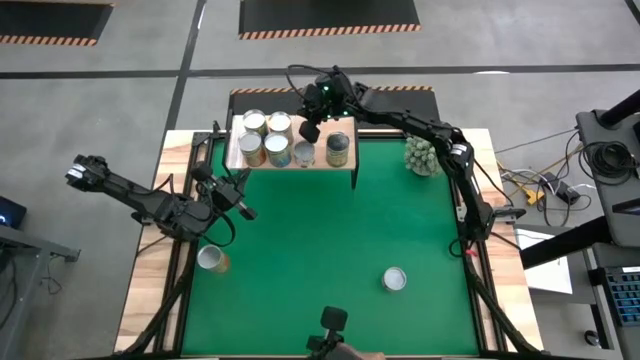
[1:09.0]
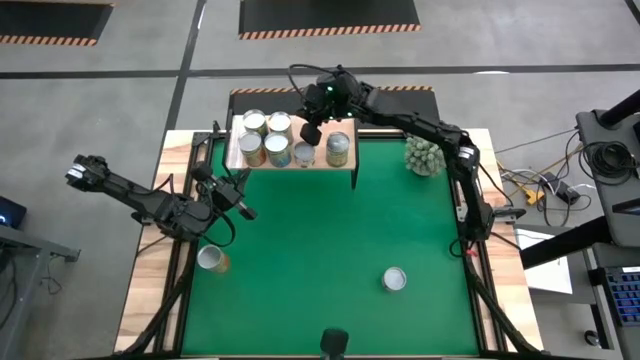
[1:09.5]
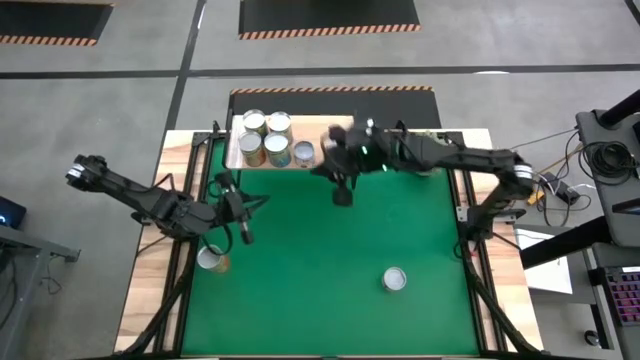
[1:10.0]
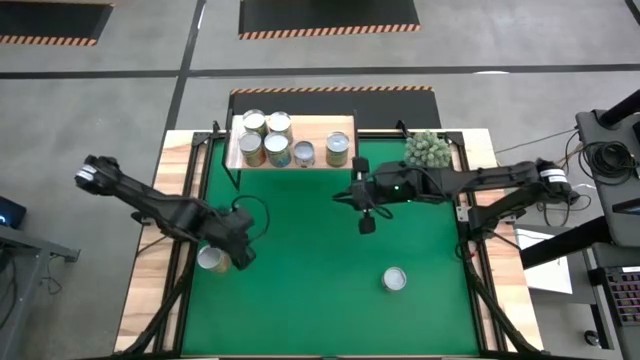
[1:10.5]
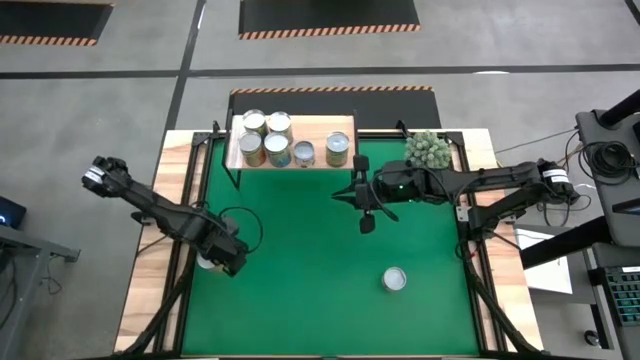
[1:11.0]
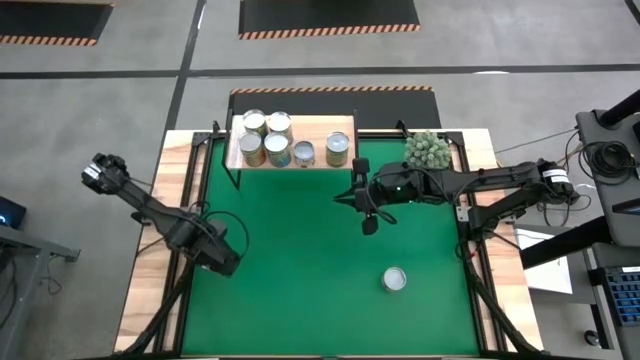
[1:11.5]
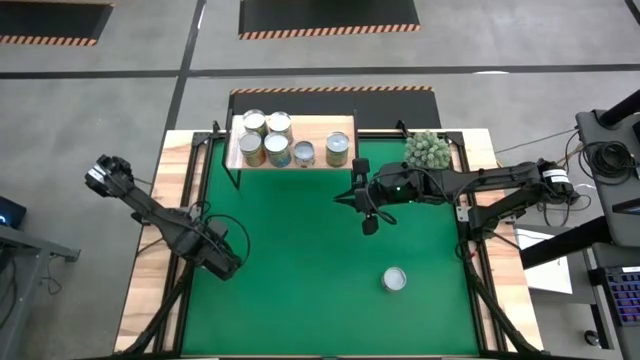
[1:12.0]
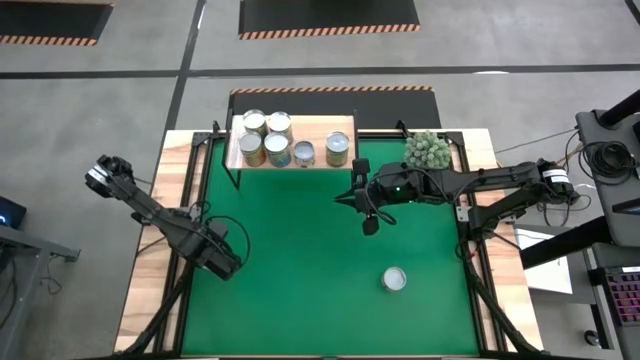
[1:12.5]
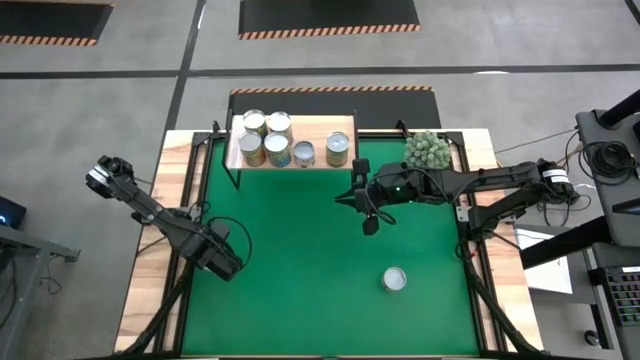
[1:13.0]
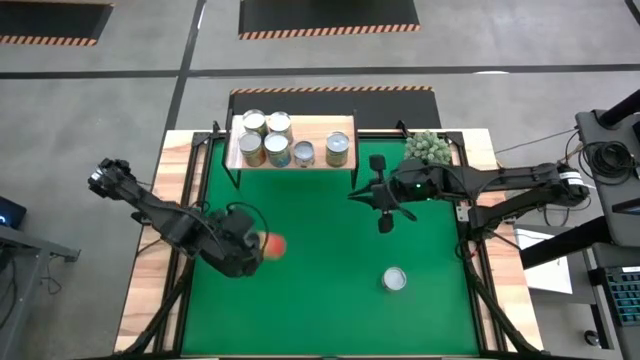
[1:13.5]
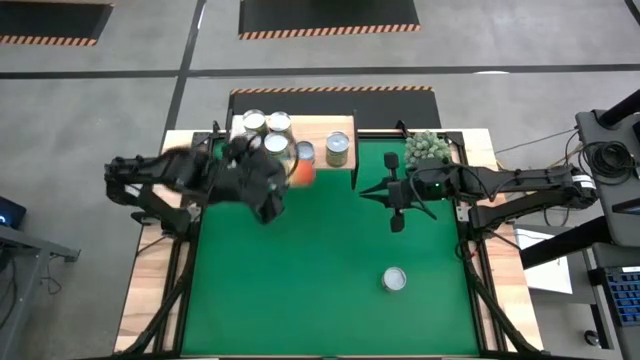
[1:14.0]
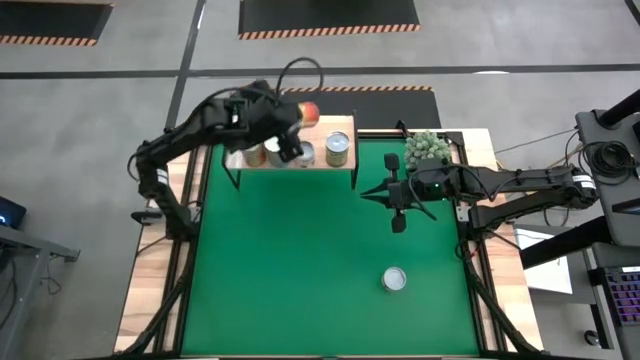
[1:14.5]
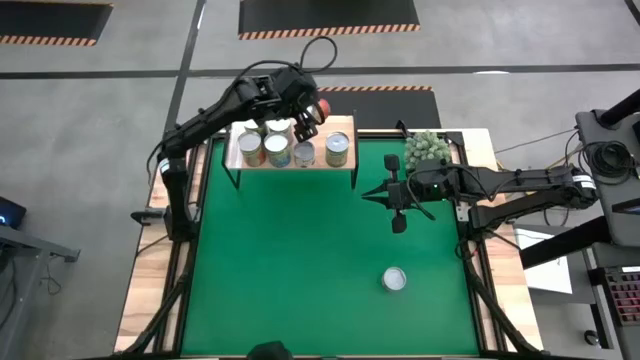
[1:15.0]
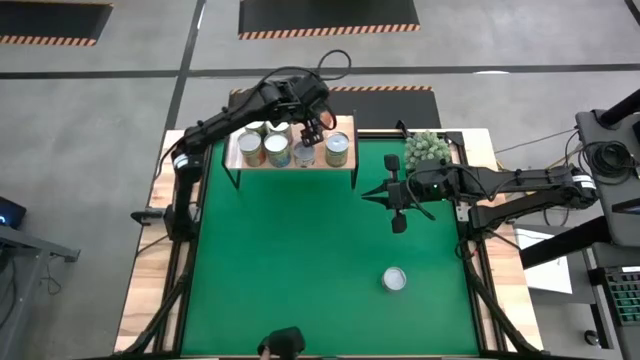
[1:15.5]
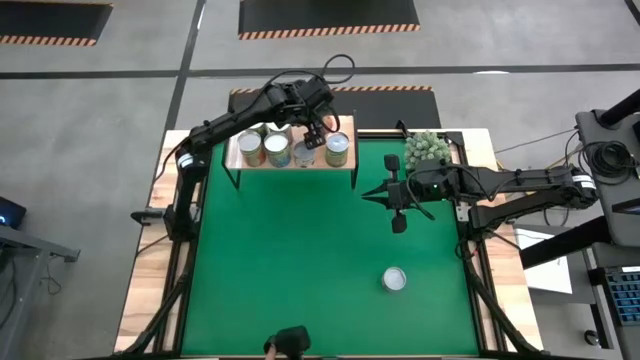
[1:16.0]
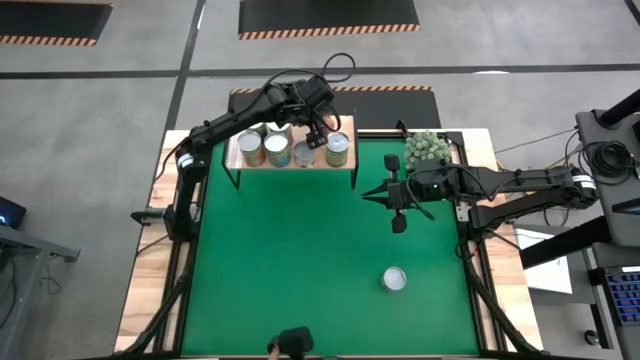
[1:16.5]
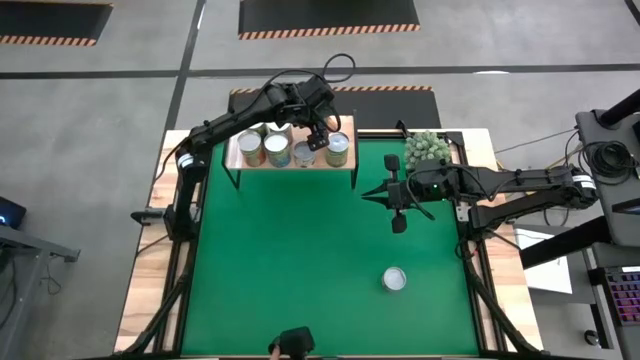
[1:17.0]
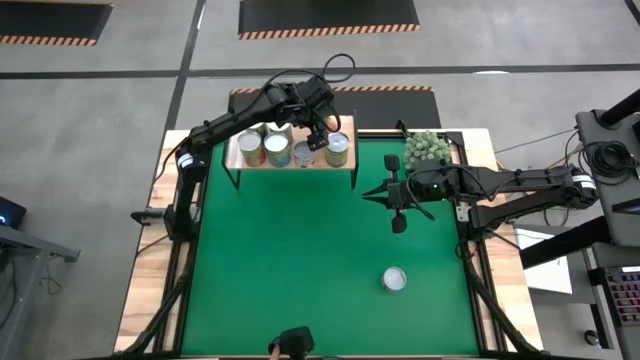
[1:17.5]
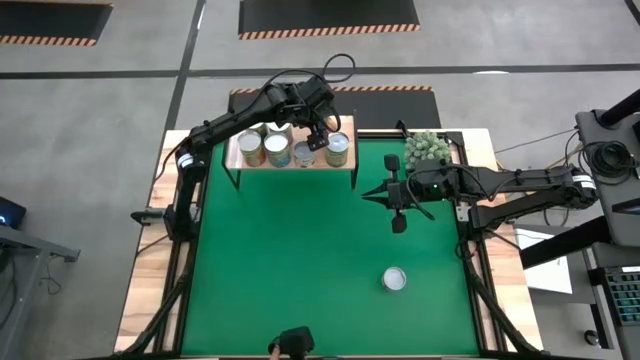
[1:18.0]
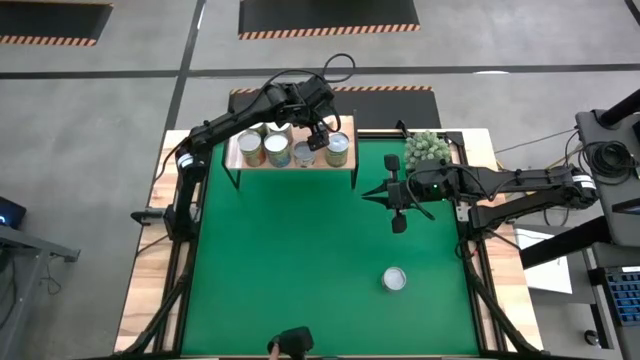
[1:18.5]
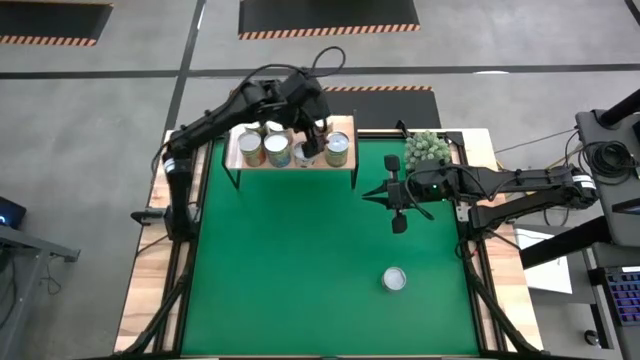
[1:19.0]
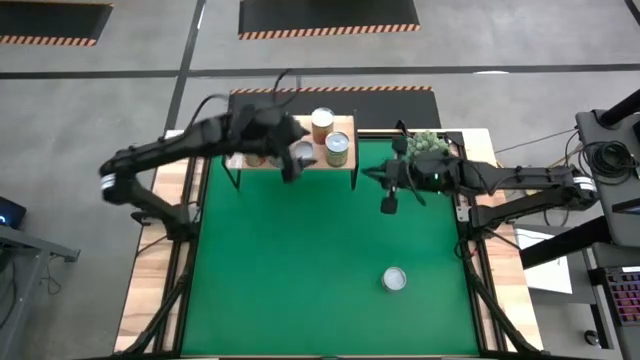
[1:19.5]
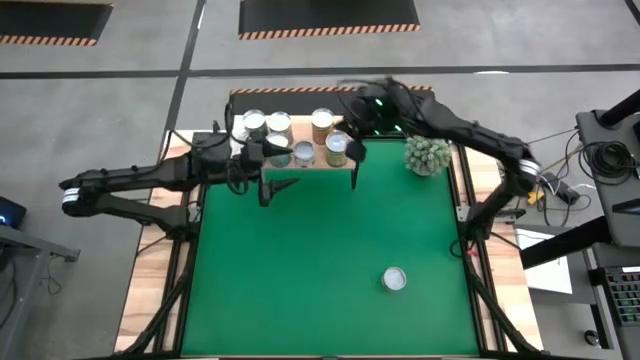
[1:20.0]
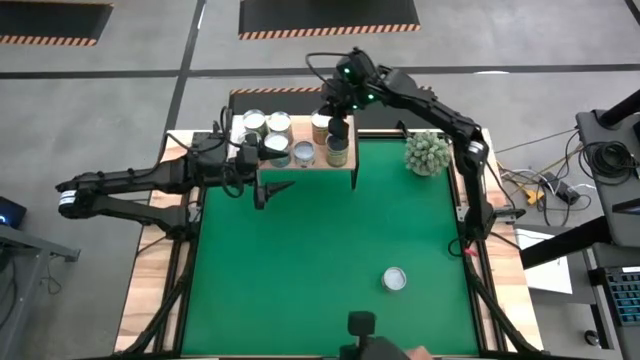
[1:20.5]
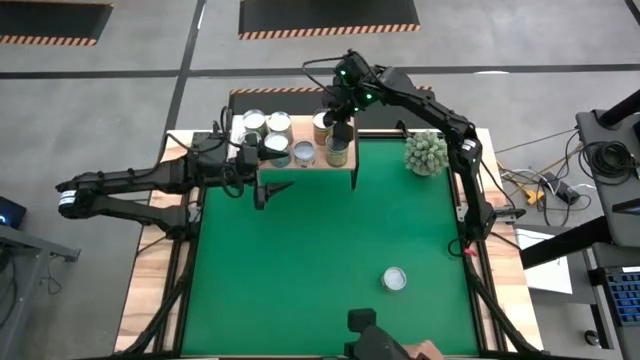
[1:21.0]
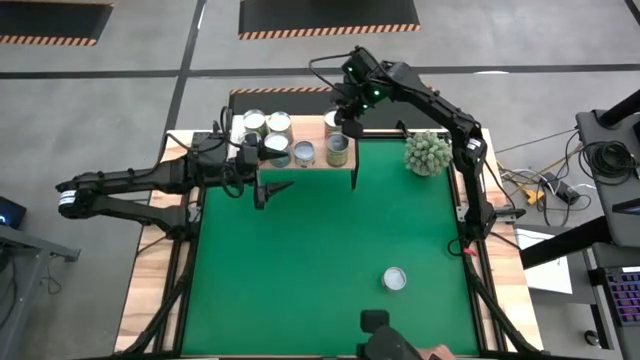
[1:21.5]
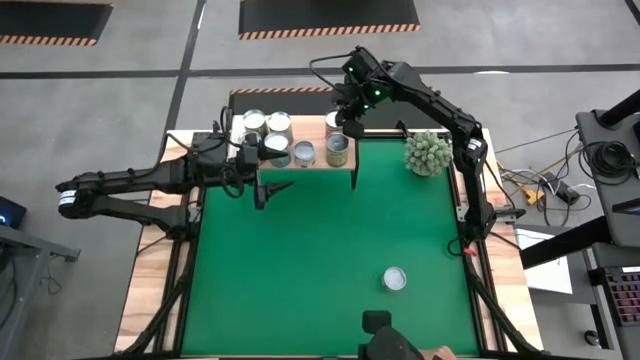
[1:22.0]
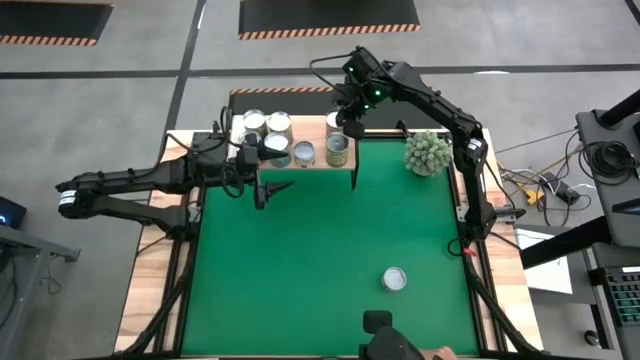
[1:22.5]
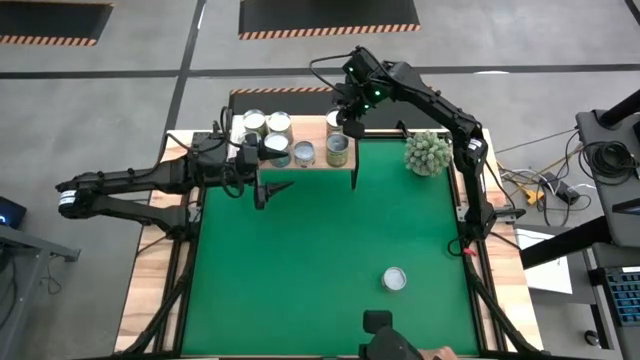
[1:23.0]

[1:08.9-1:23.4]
Task: Pick and place cans onto a shelf
Put the canned pineapple on the shelf

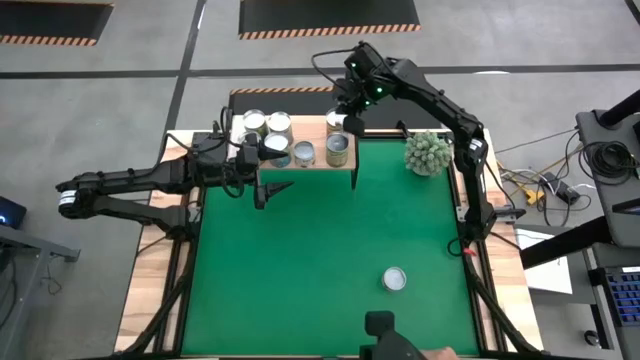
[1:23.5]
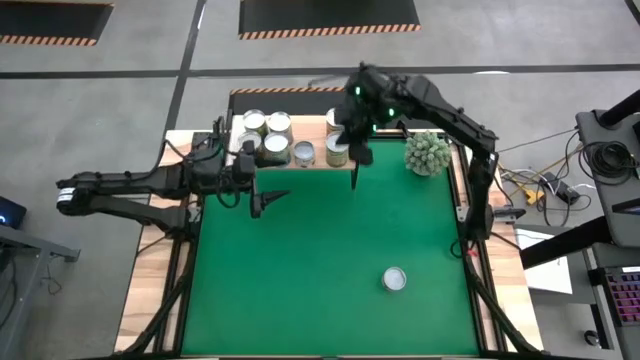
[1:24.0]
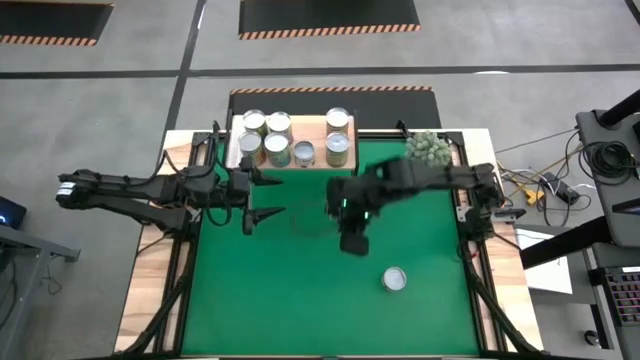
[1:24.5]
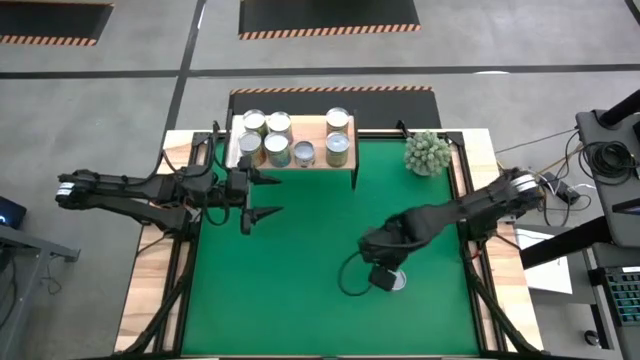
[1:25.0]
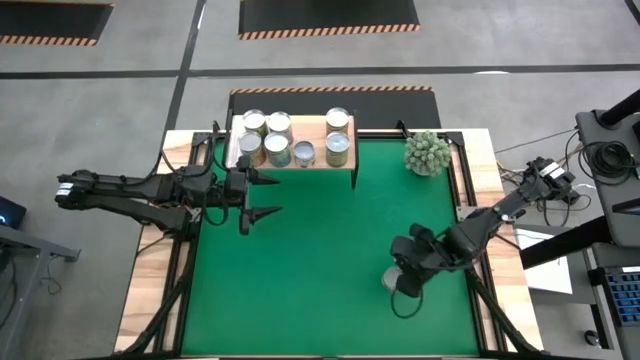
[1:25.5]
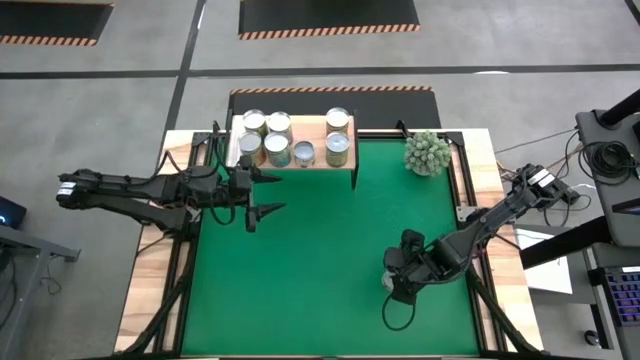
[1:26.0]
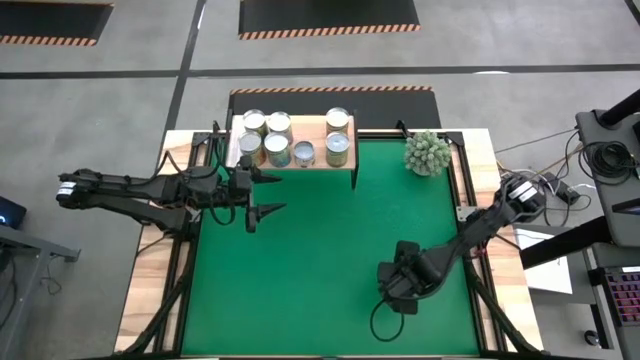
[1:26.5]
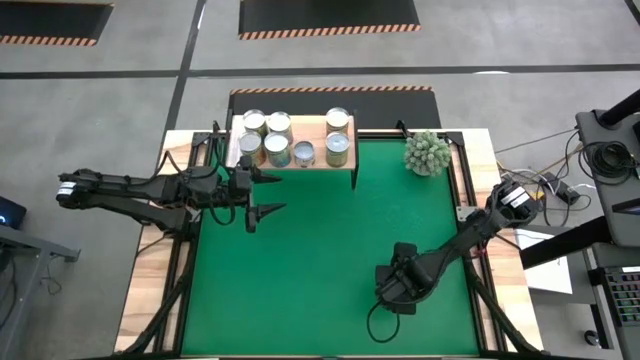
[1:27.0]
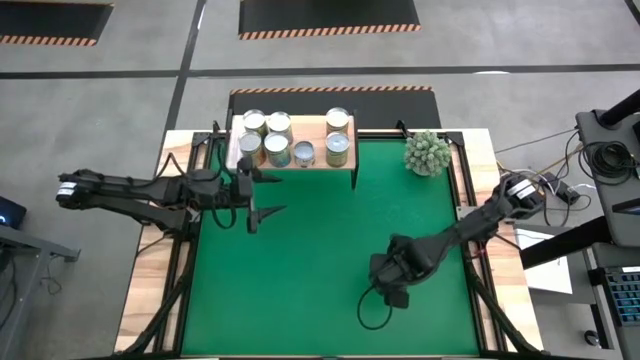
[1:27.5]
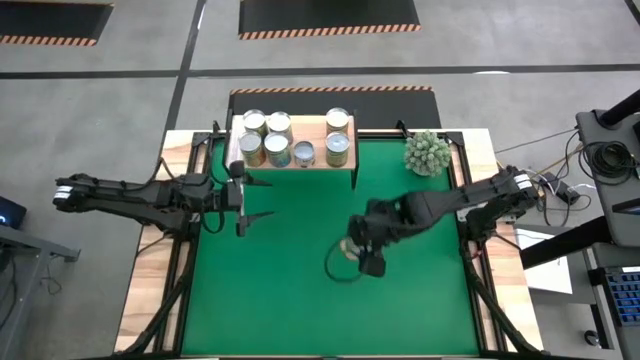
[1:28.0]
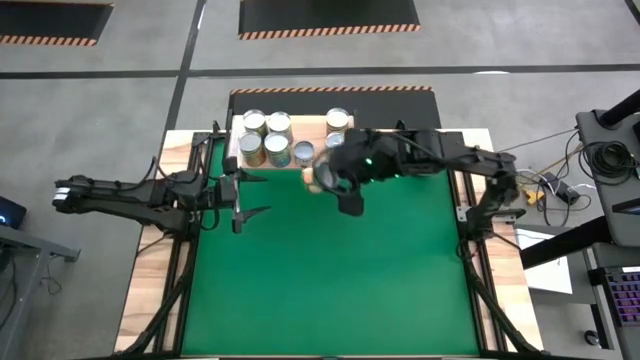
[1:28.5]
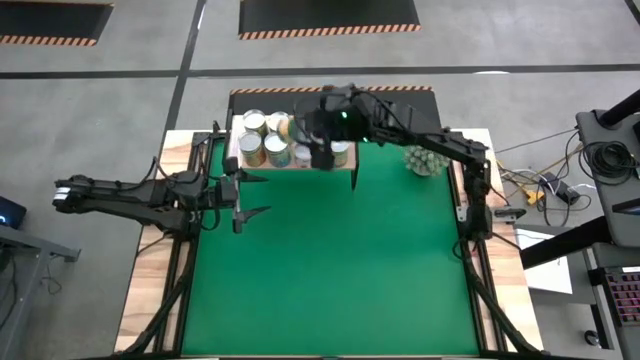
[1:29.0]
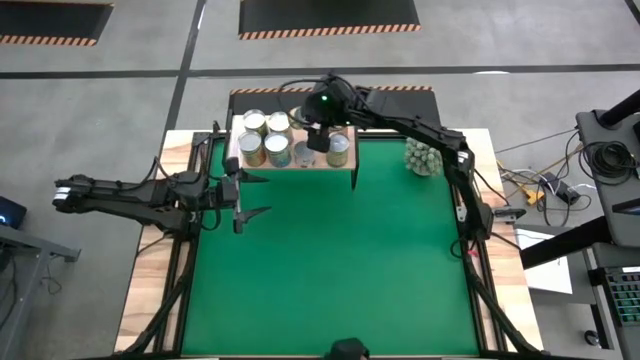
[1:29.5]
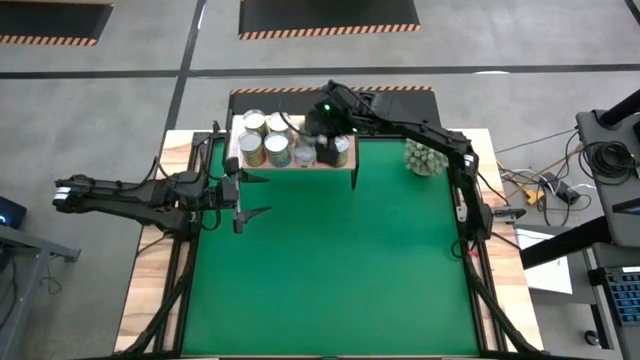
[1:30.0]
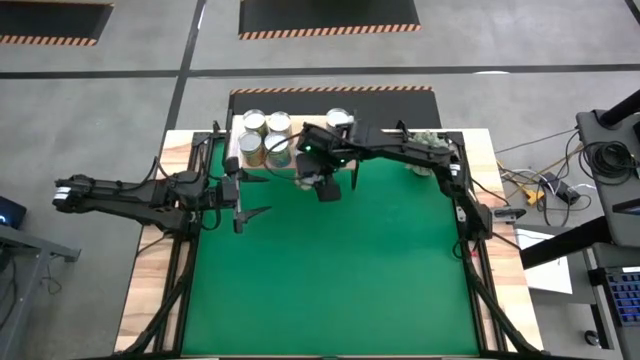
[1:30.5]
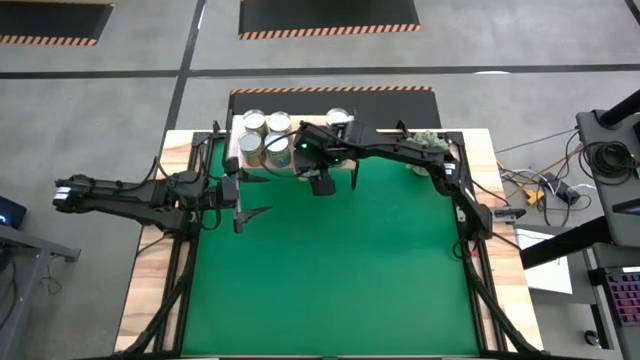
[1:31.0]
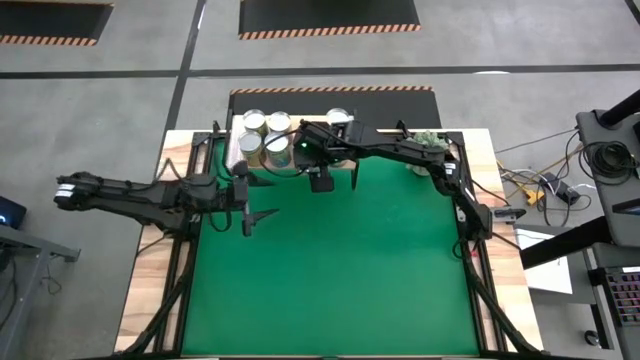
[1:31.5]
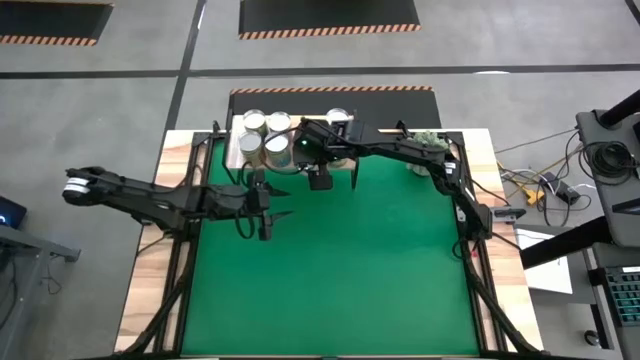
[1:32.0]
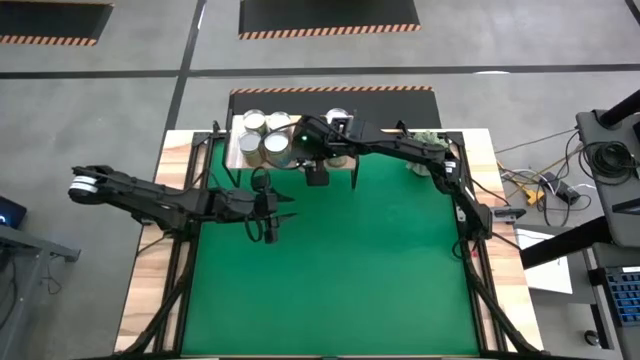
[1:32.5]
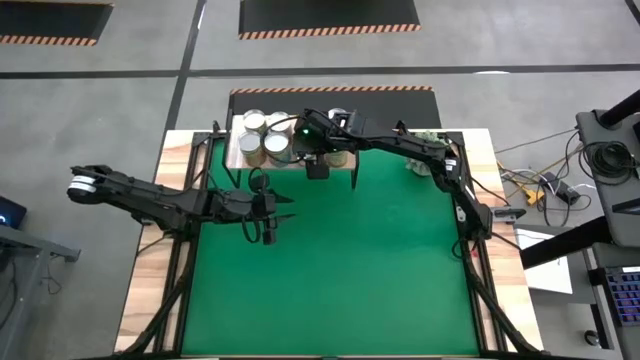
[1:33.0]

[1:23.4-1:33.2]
Put the canned sliced peaches on the shelf
